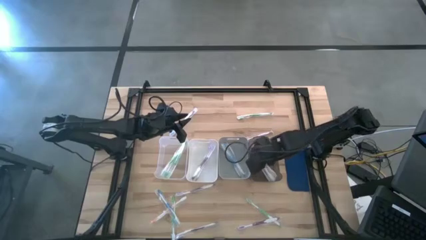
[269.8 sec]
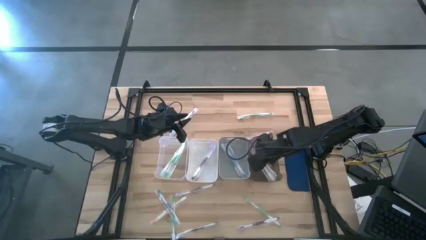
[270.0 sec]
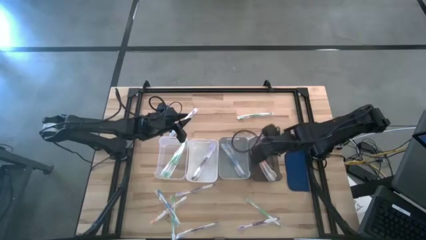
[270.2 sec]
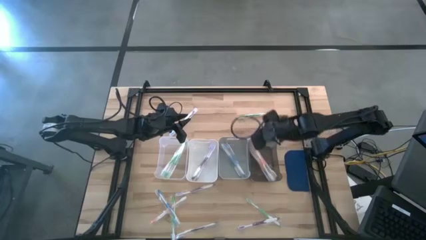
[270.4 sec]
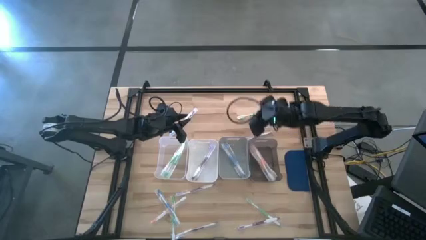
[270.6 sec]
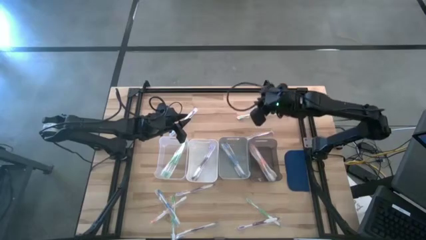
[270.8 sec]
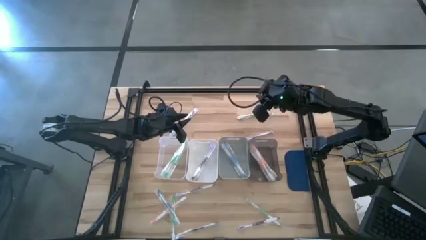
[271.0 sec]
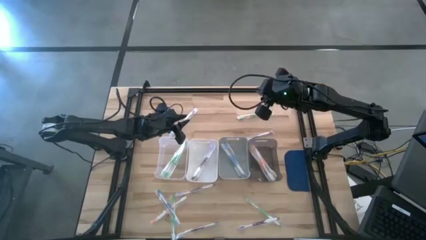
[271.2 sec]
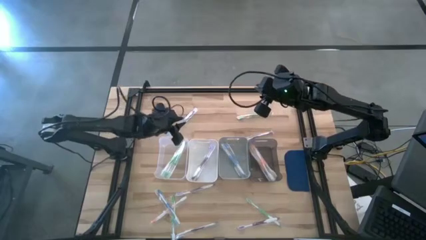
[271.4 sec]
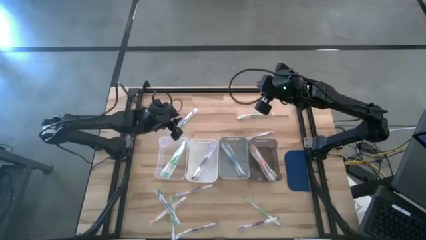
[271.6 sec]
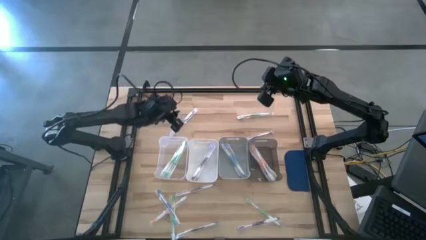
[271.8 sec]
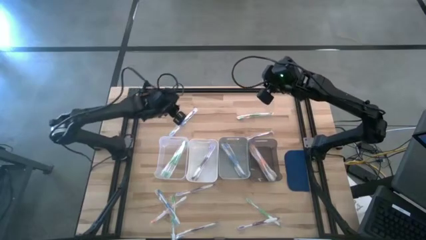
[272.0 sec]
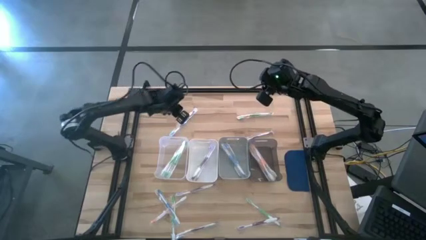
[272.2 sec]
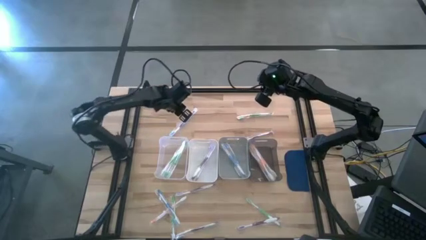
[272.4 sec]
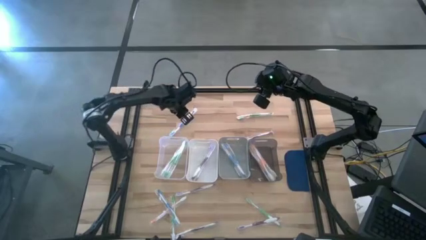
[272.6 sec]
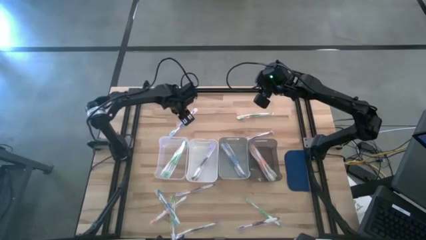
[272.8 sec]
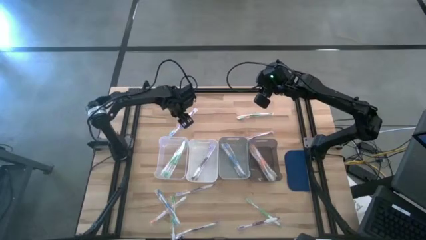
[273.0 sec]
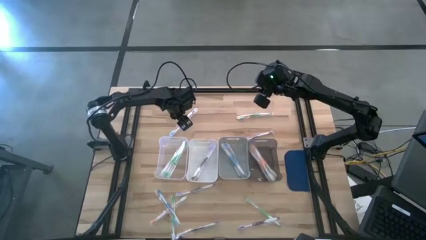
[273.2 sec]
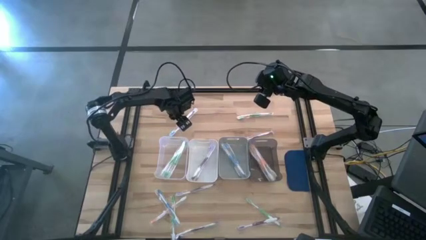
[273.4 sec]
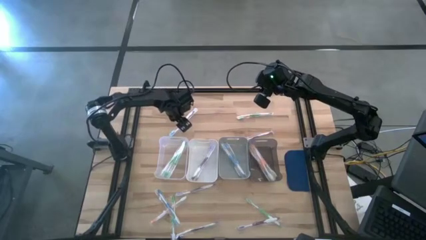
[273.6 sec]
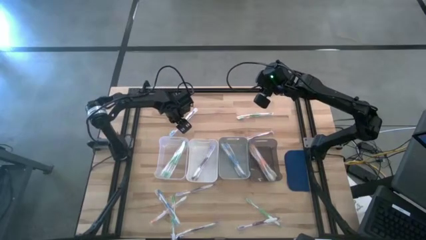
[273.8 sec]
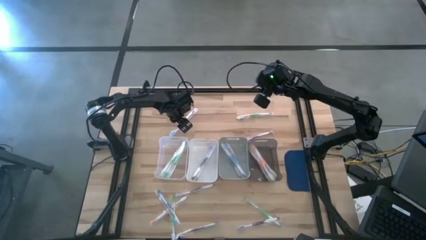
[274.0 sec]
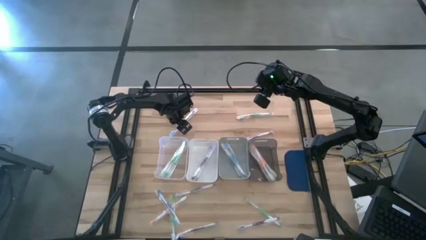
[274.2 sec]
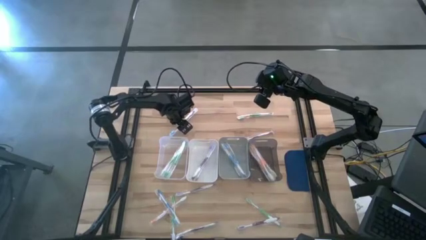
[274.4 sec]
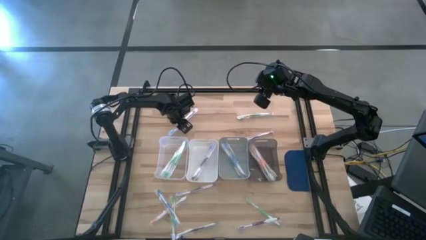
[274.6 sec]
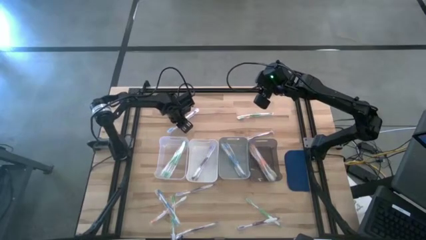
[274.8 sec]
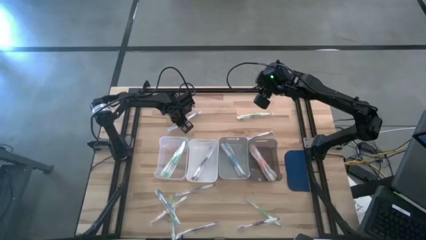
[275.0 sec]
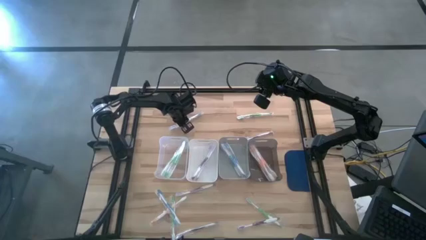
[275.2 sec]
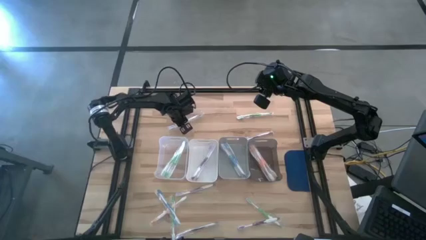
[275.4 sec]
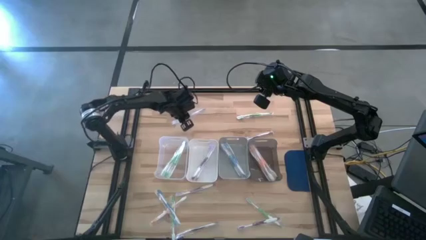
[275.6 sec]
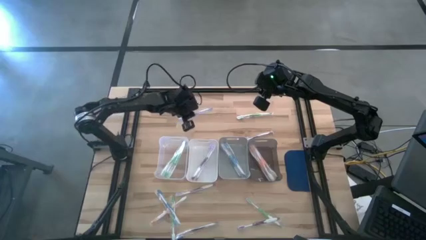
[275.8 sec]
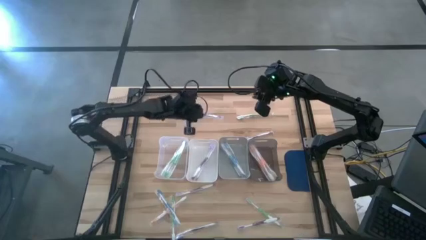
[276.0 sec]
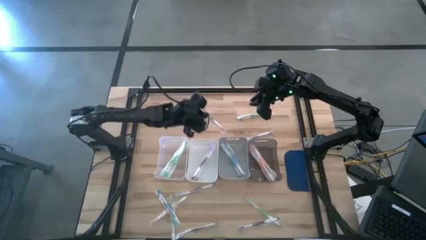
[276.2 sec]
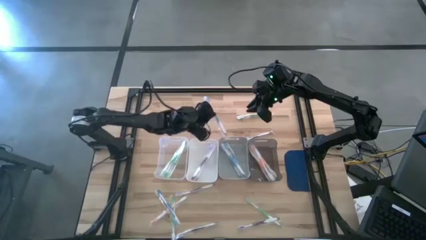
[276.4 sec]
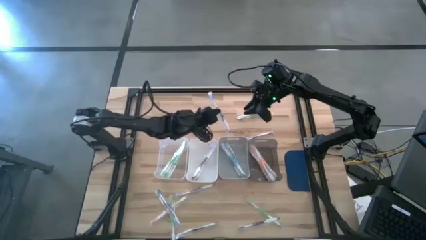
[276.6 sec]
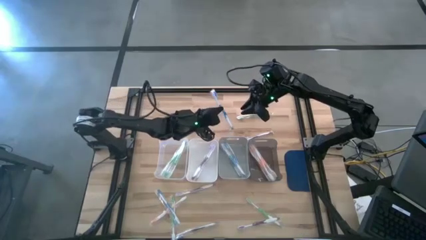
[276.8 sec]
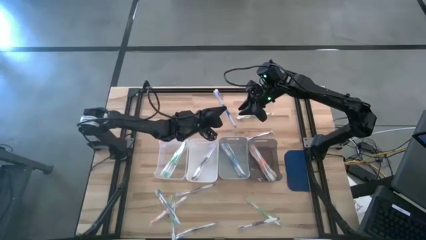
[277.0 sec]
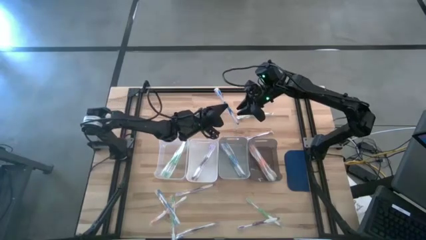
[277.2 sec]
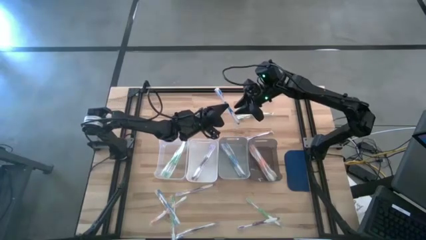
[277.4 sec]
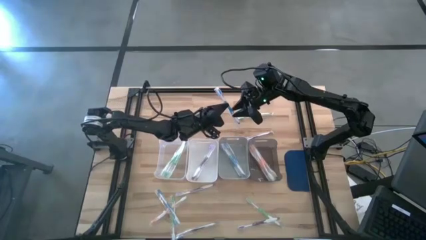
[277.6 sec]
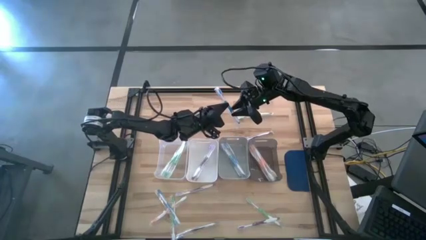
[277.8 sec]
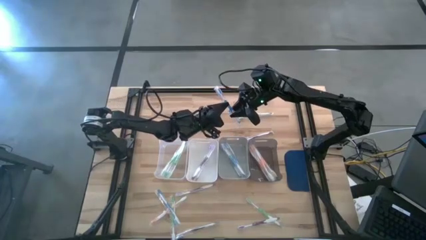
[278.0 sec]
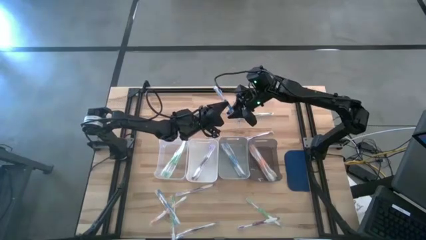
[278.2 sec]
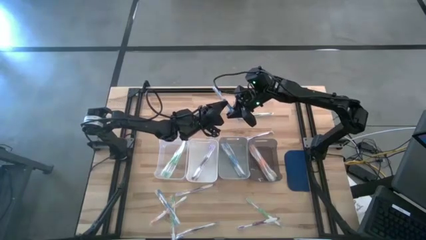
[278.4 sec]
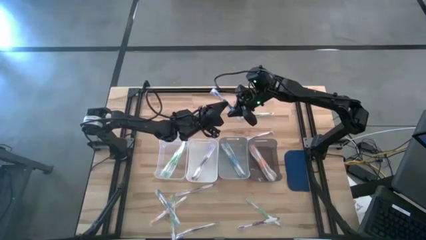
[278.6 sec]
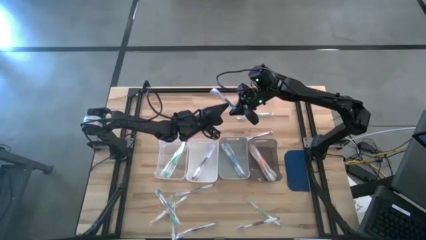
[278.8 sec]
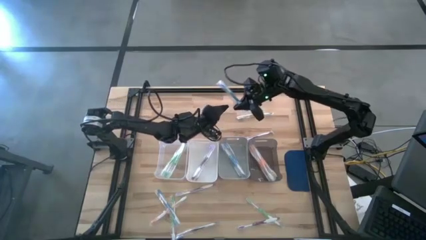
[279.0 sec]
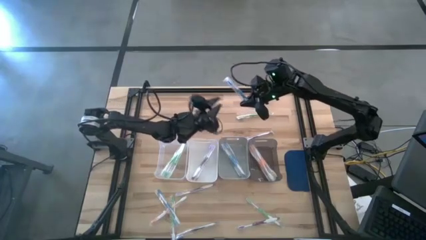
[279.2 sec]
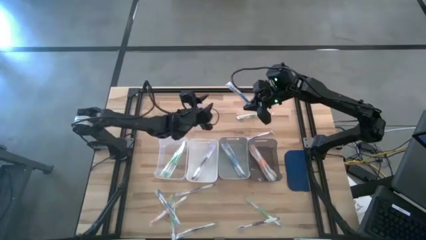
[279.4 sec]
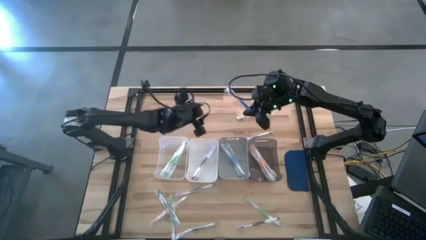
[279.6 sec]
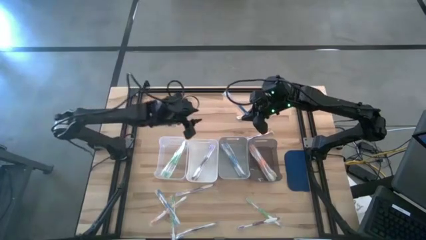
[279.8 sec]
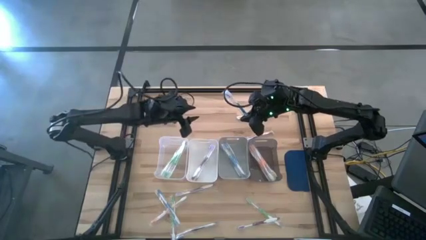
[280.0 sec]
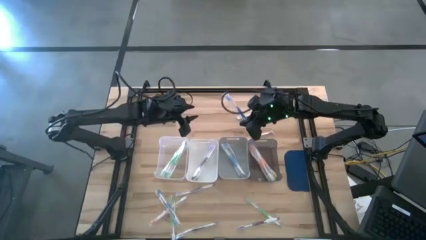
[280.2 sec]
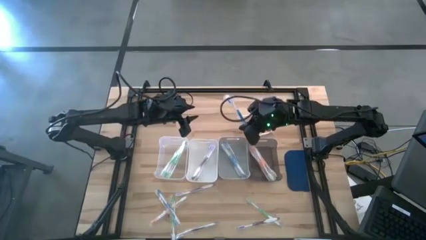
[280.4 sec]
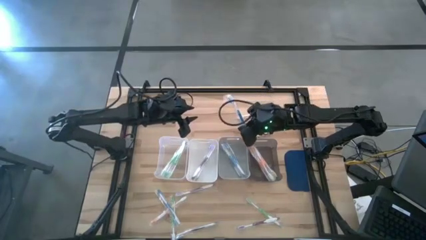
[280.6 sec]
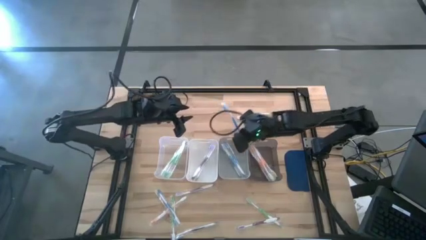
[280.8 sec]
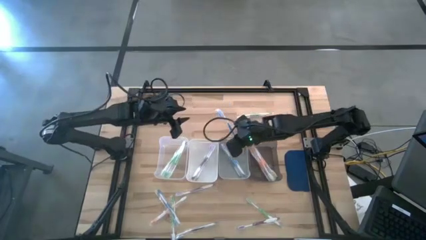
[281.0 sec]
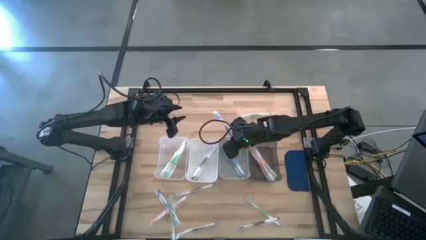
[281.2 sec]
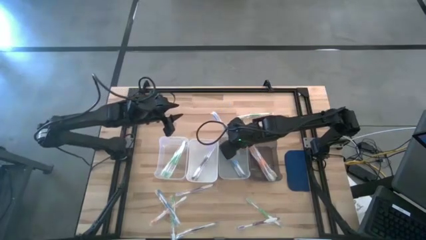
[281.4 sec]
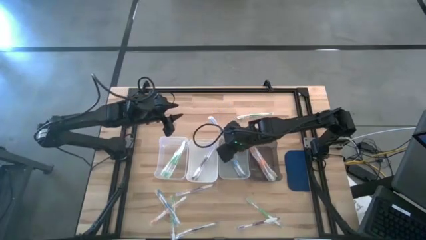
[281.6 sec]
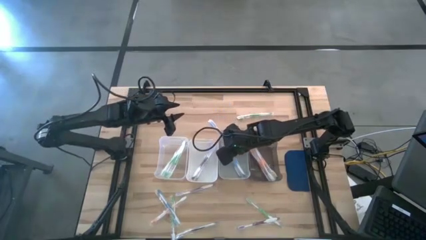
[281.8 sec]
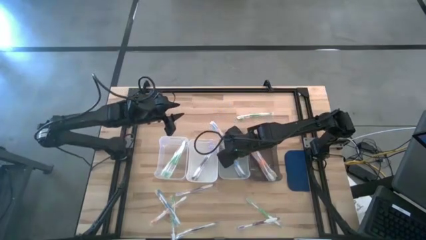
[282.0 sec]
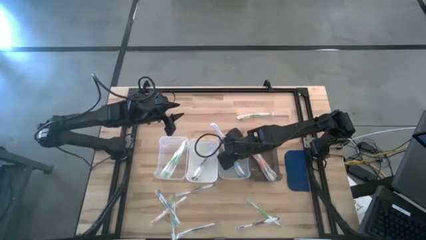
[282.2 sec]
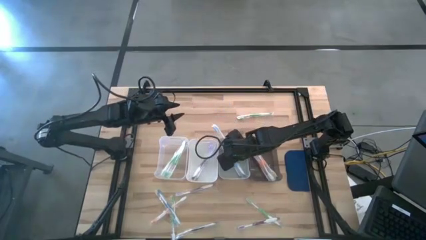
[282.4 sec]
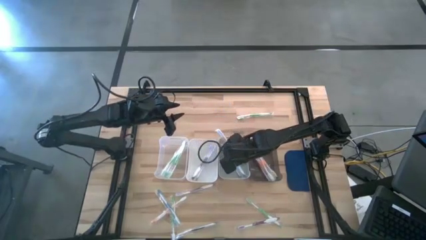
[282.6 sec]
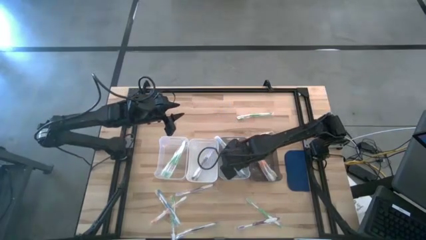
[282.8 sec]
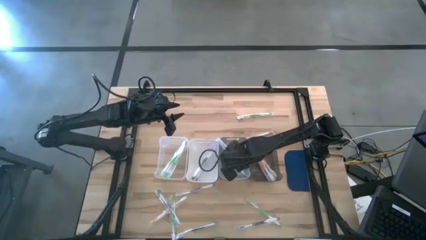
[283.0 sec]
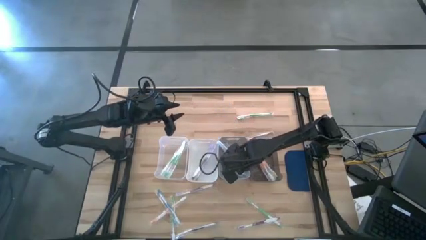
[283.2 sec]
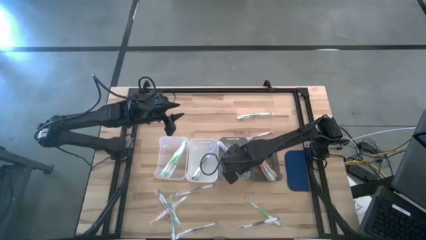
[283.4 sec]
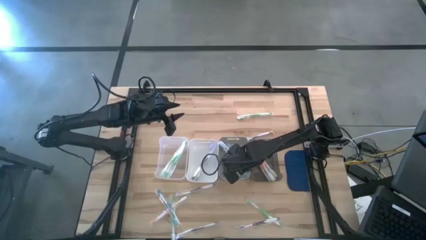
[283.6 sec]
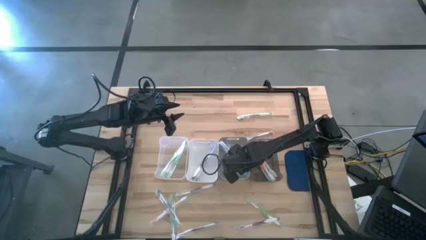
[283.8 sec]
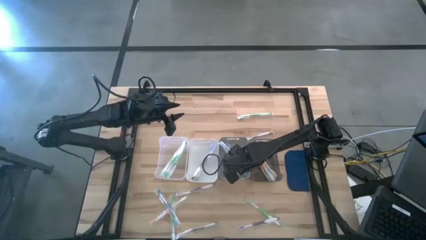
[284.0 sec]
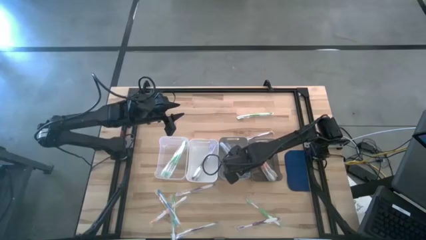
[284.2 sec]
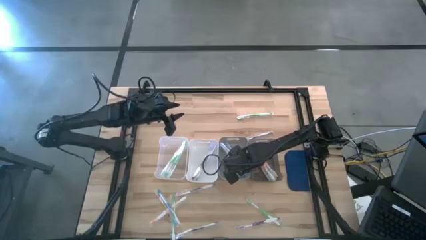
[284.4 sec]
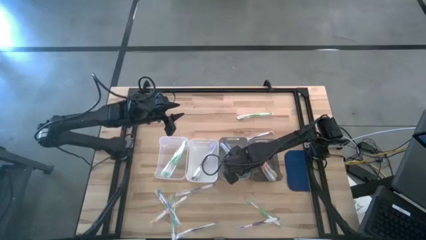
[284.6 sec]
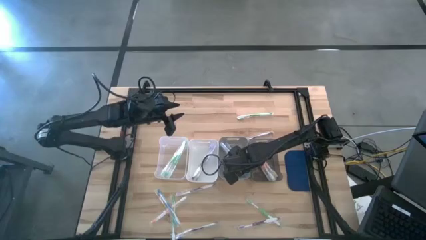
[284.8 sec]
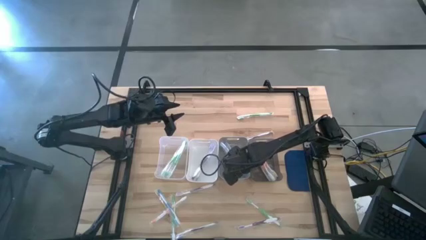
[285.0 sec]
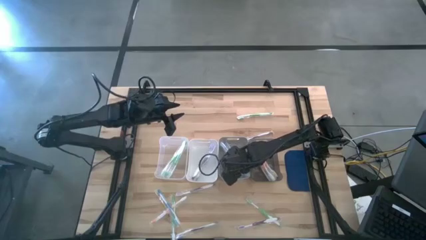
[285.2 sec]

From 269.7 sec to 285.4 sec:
Task: Pick & Place Toothbrushes
Put the blue toothbrush into the gray bin
